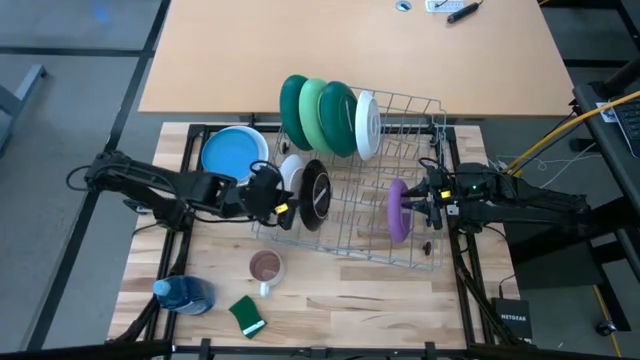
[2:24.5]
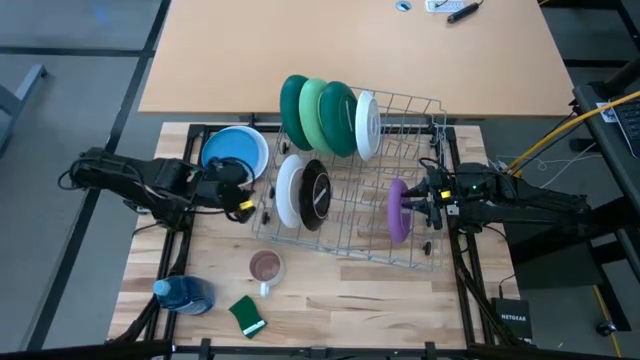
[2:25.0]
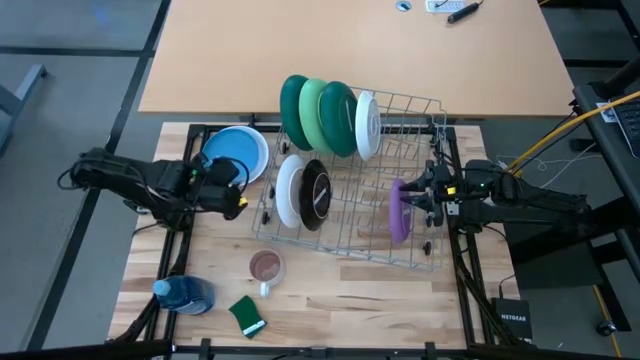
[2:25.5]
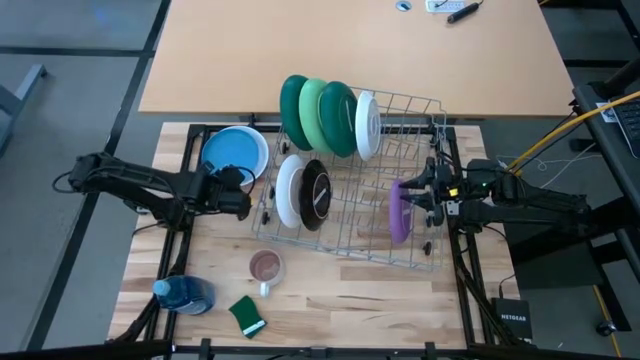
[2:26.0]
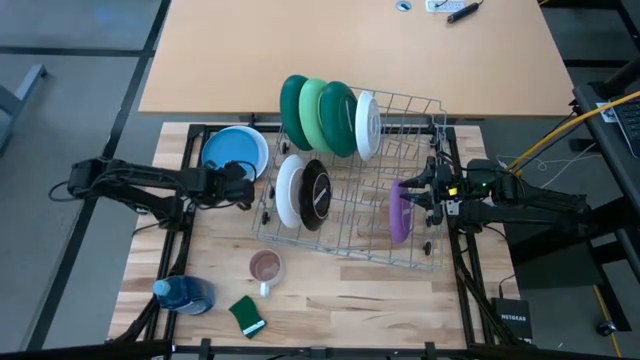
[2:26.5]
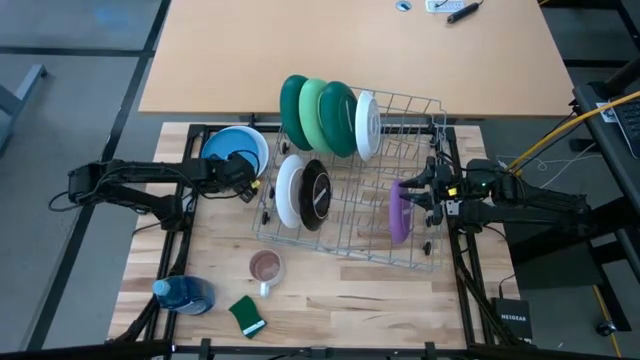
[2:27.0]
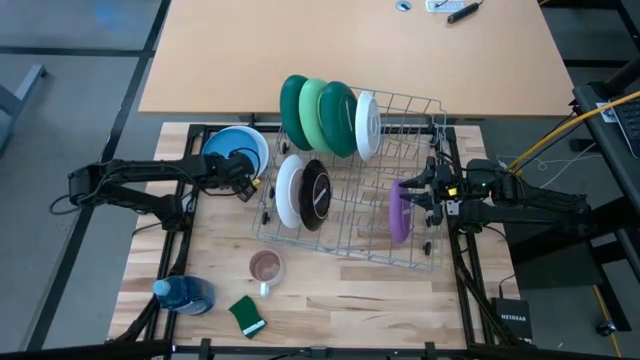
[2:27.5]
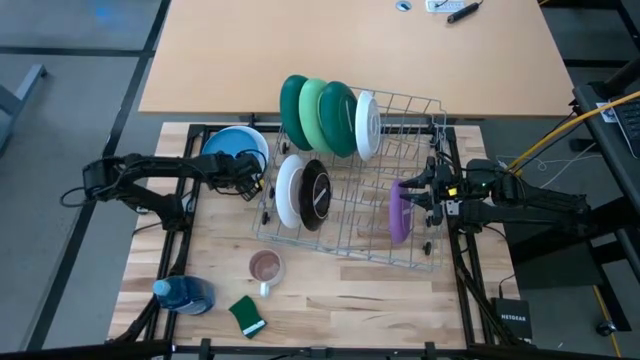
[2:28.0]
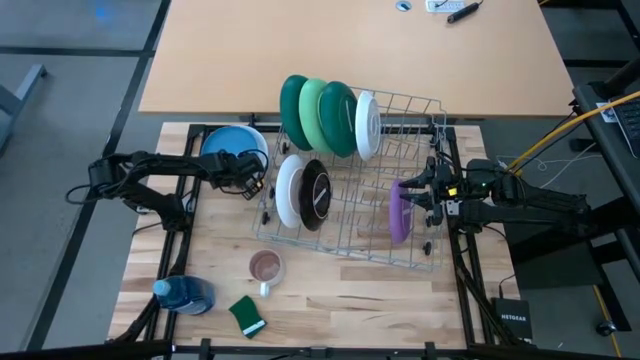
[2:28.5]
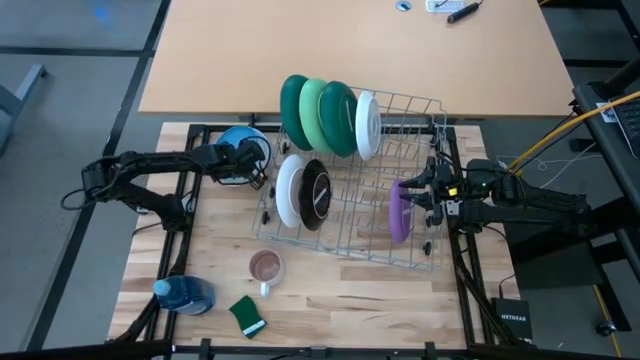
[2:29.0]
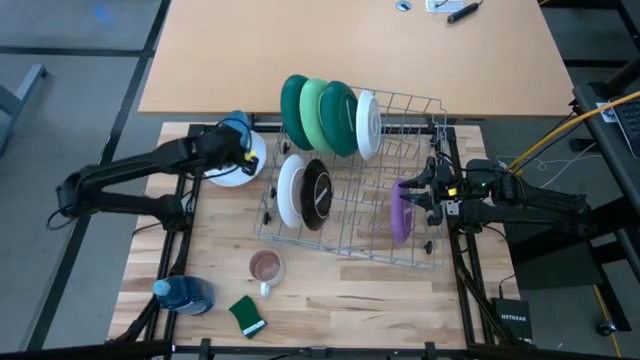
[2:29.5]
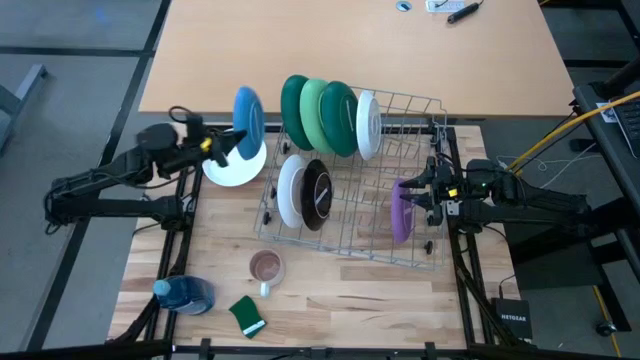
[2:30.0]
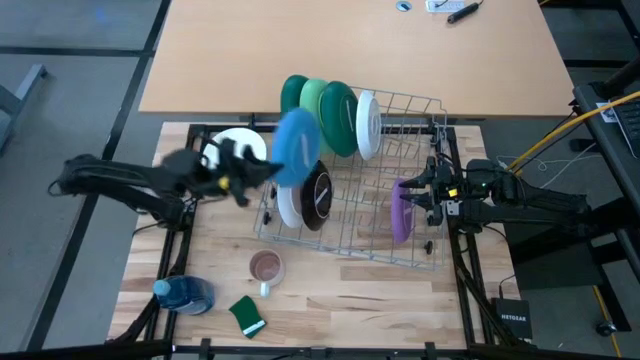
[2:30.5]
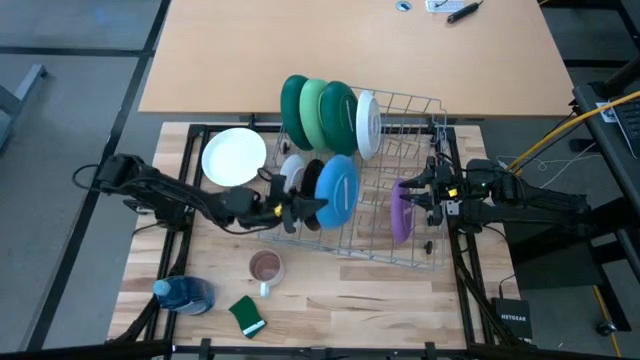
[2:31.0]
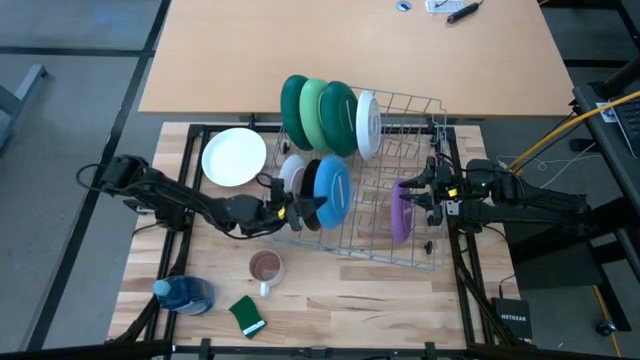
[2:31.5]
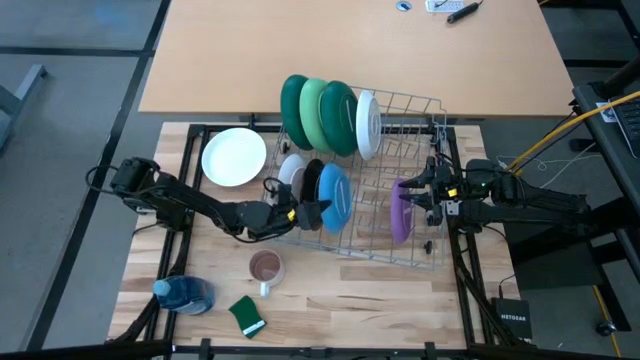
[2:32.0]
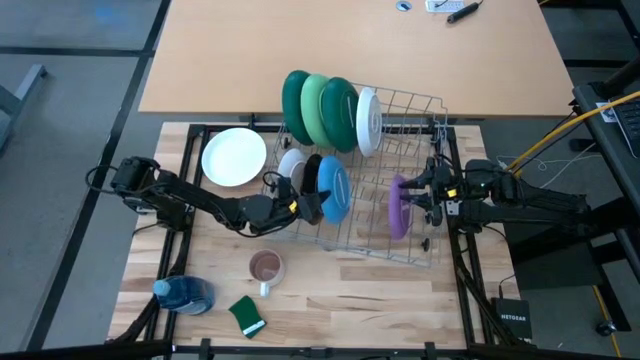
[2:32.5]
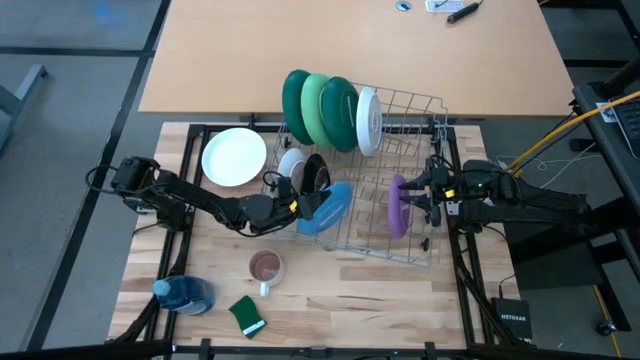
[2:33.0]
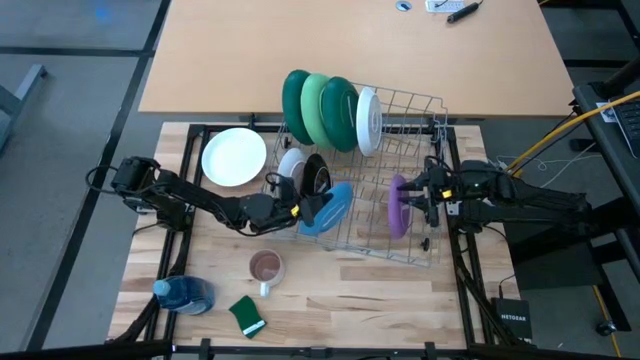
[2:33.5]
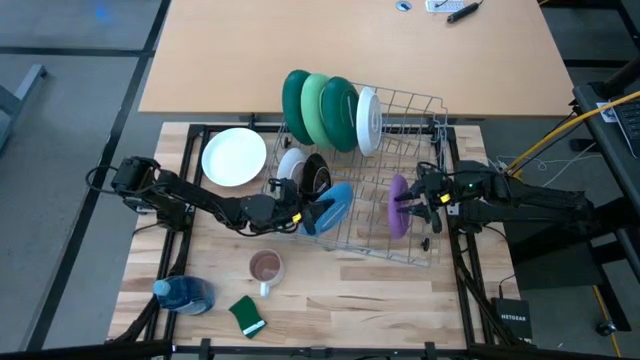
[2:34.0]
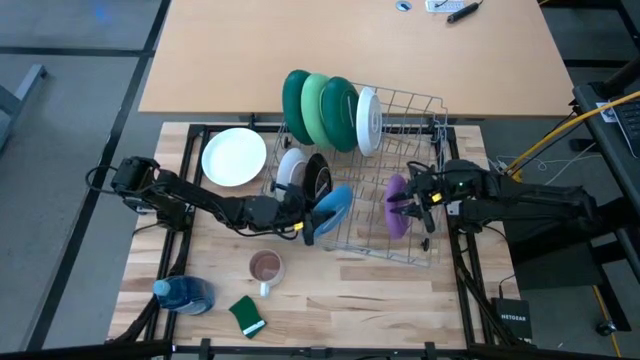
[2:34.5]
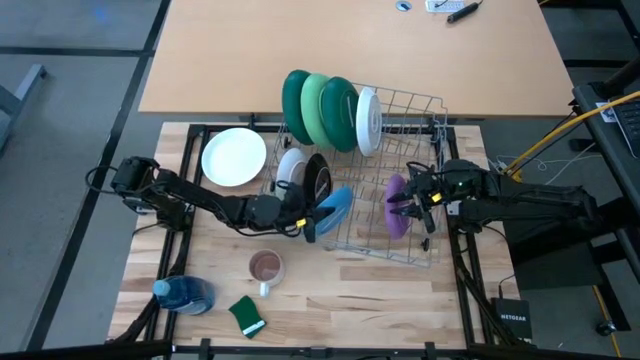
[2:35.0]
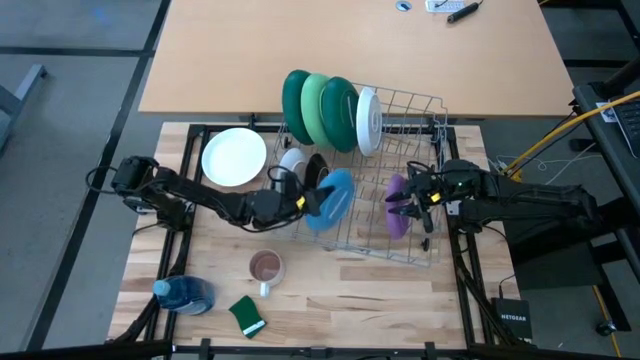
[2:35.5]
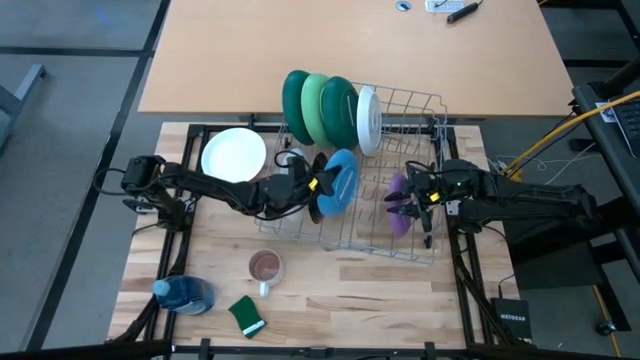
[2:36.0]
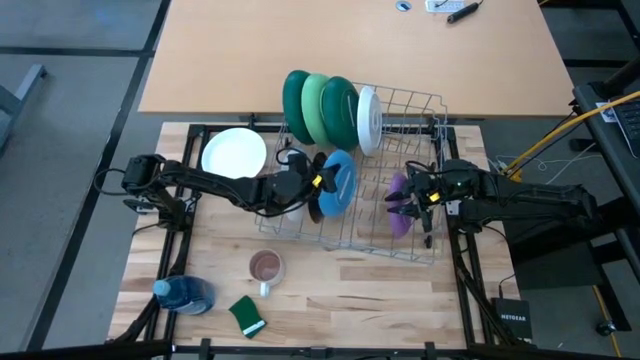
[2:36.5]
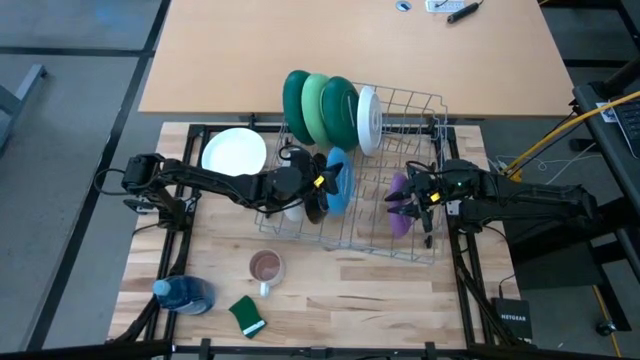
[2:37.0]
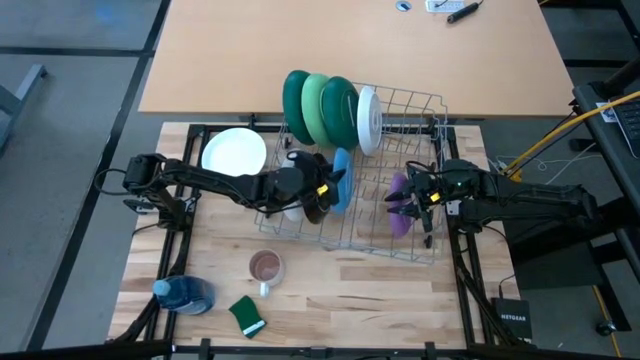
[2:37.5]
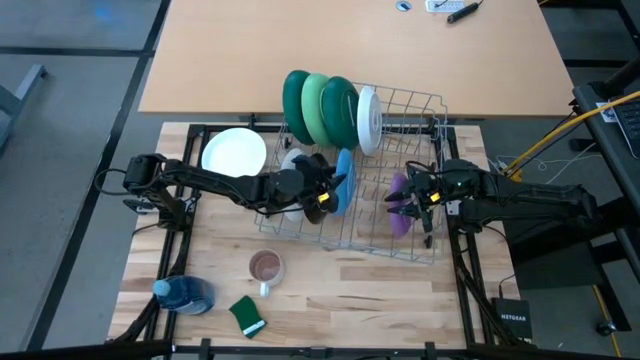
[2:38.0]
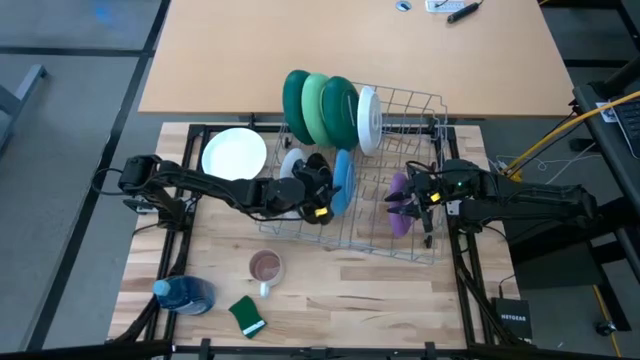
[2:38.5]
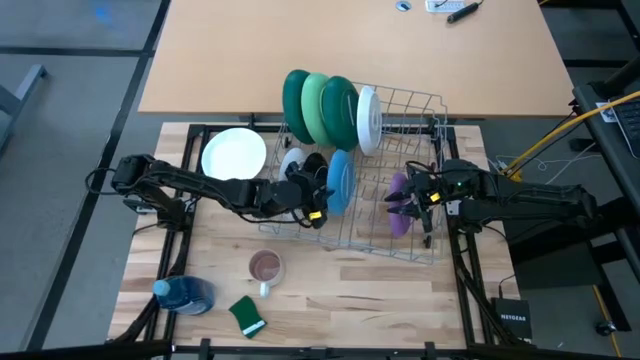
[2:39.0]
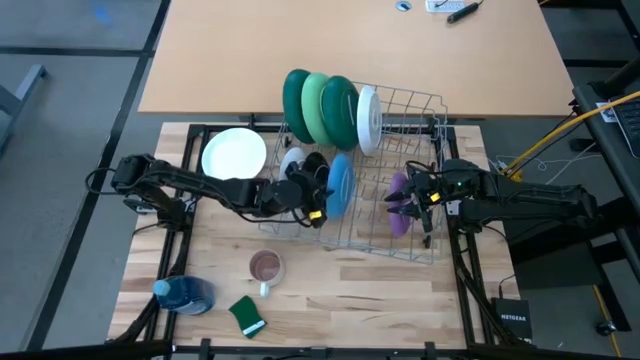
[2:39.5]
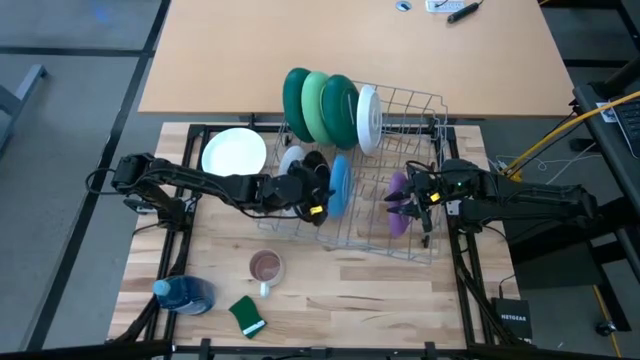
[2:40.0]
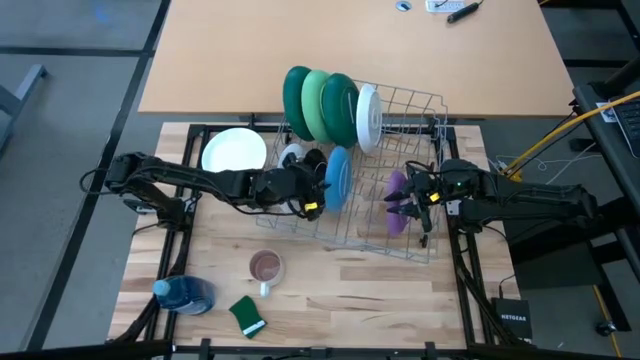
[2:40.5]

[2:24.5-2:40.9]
Task: Sort dishes
Put the light blue plate into the dishwasher rack

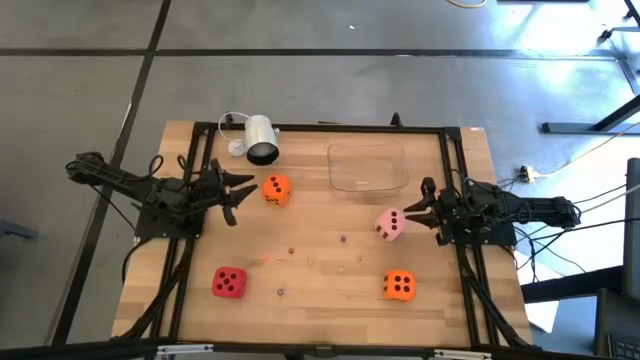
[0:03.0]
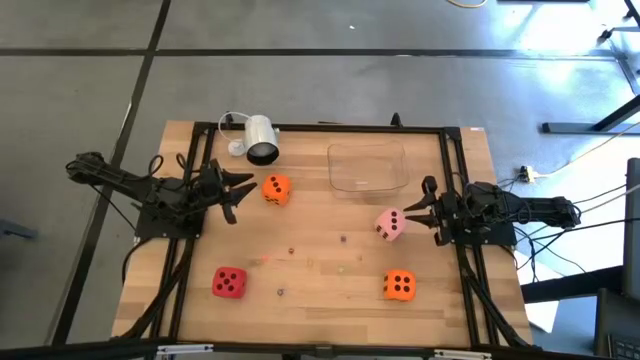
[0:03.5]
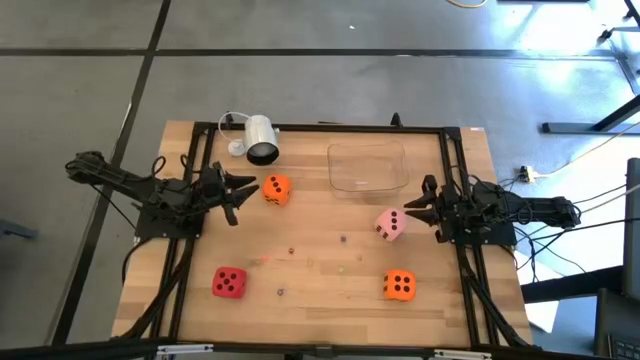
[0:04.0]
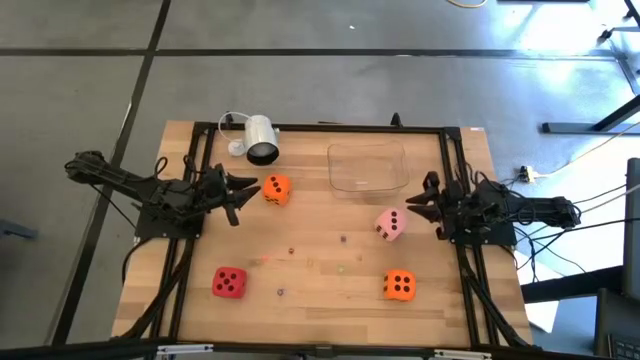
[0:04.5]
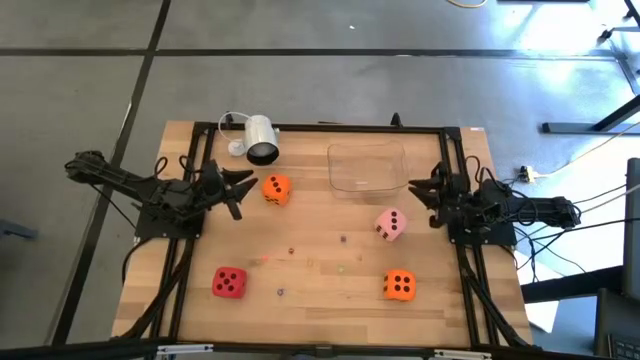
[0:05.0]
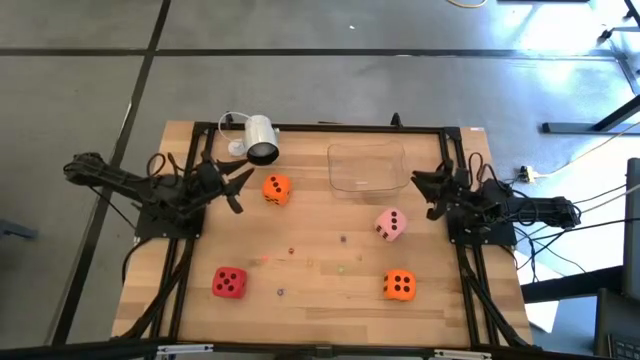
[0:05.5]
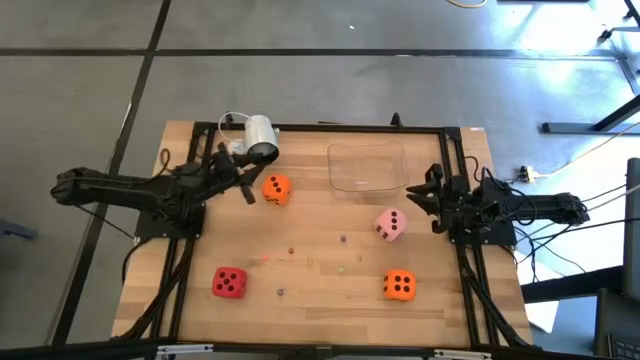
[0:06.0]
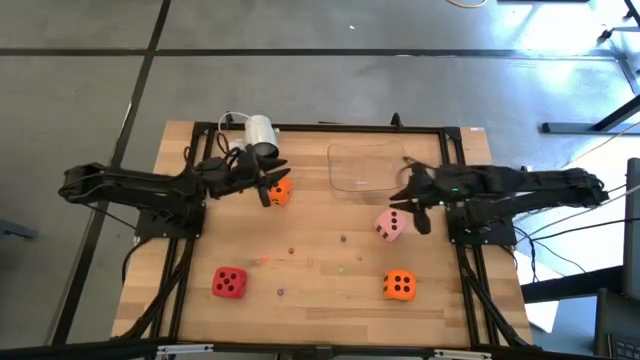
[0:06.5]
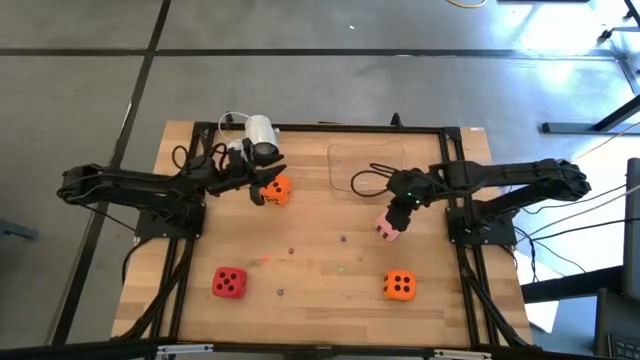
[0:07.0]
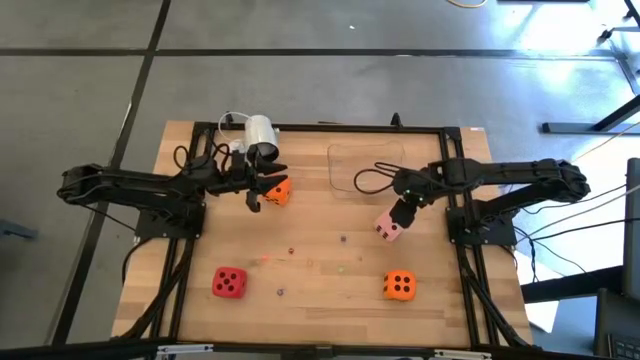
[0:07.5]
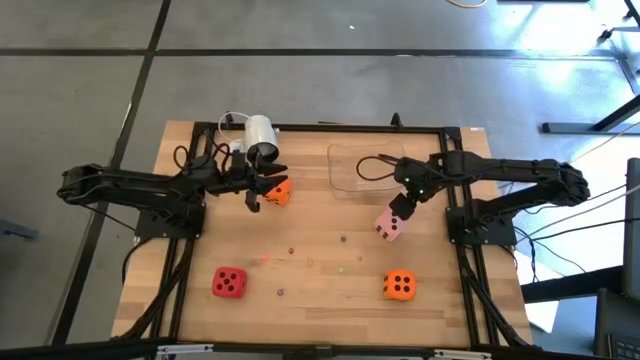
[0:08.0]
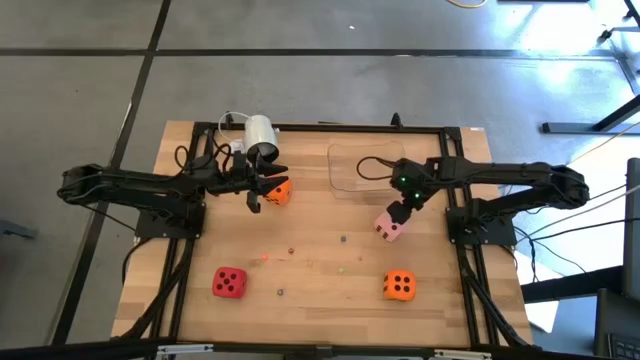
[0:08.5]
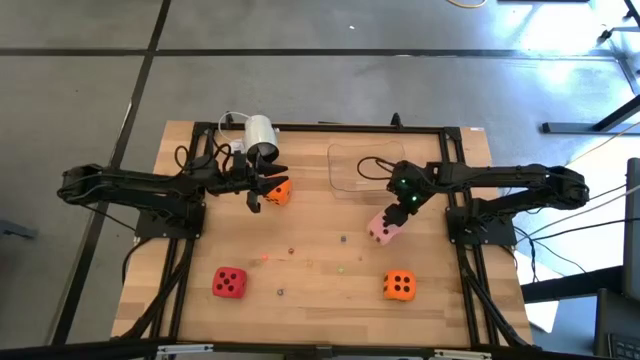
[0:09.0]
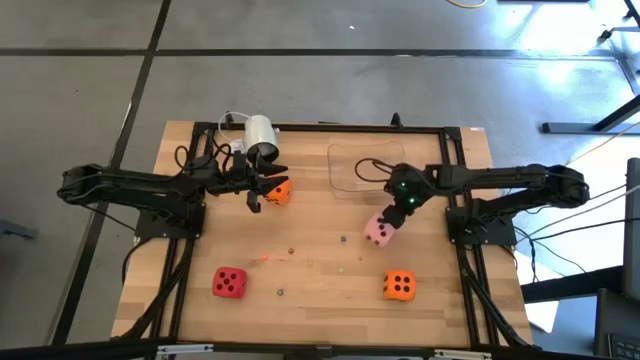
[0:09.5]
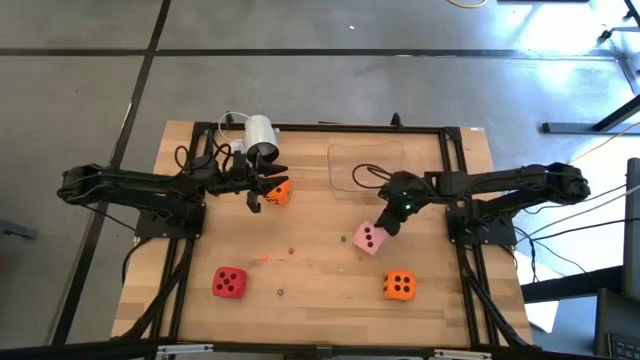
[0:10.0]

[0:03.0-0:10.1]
Task: Pick & Place Dice
Put the large pink die into the transparent bin
